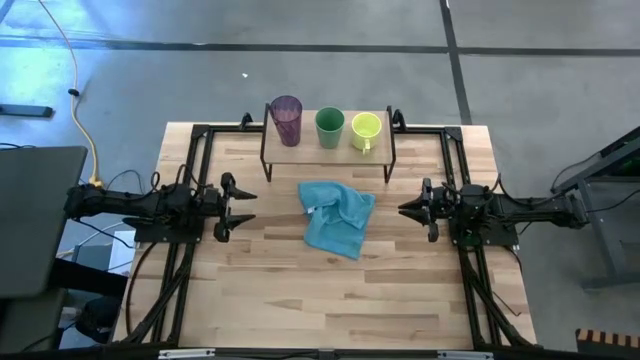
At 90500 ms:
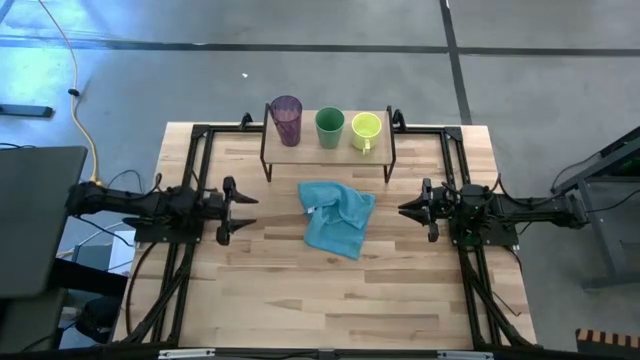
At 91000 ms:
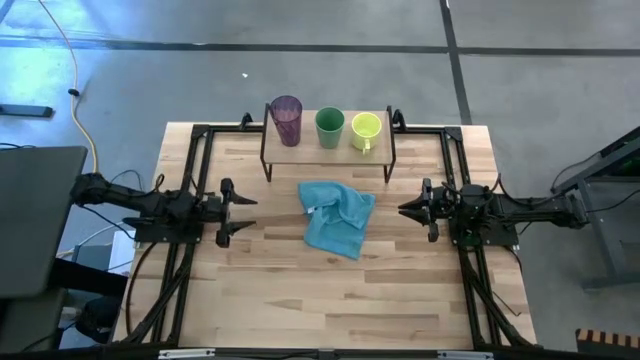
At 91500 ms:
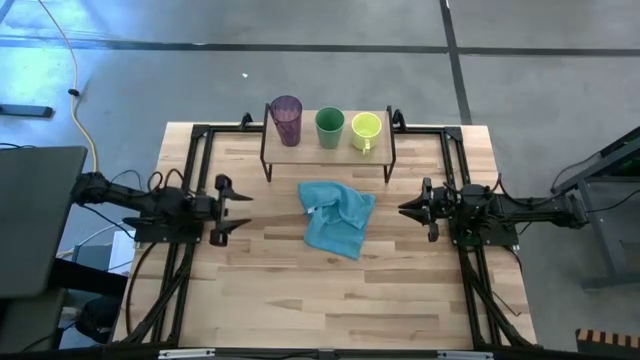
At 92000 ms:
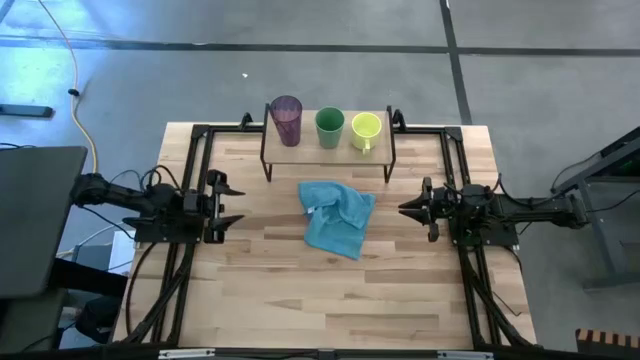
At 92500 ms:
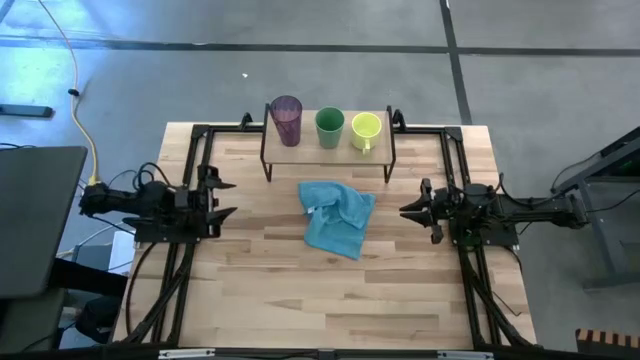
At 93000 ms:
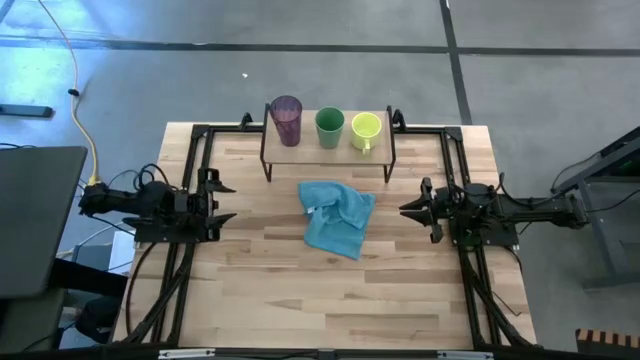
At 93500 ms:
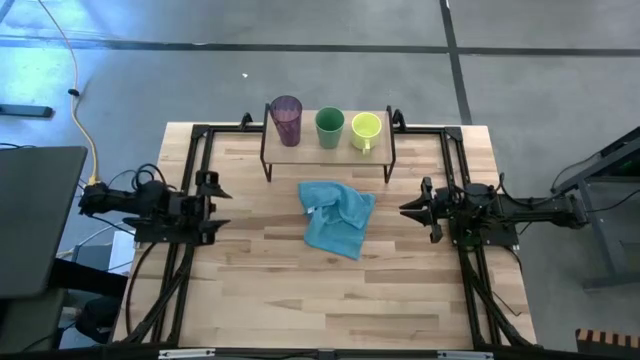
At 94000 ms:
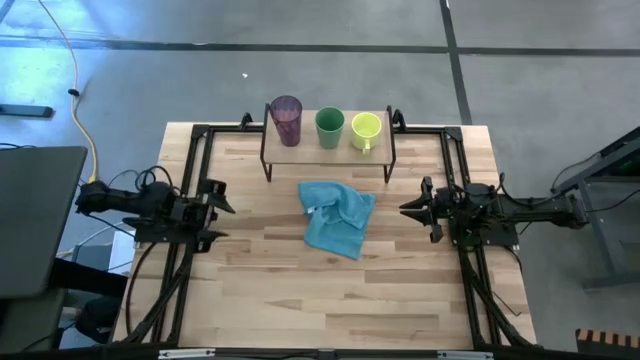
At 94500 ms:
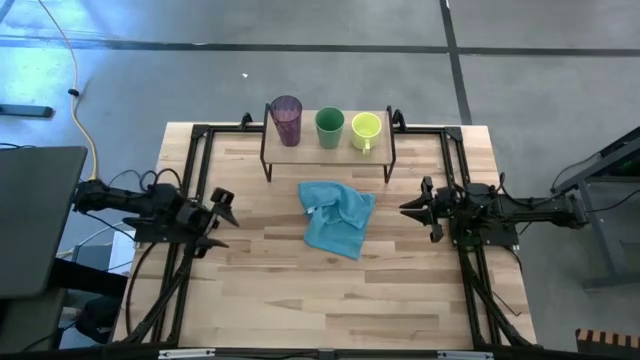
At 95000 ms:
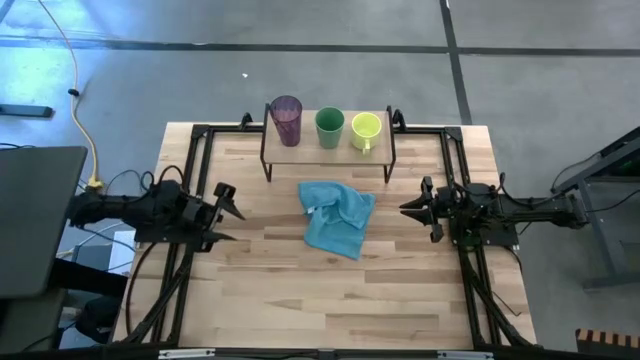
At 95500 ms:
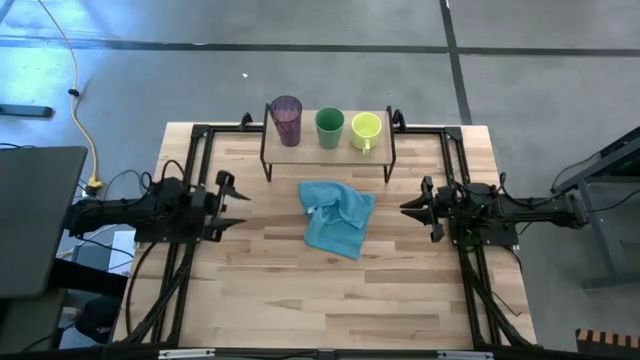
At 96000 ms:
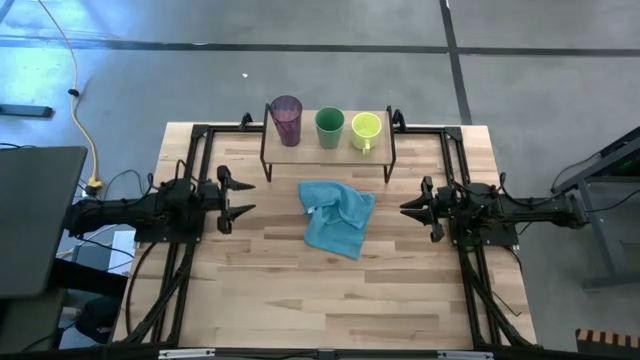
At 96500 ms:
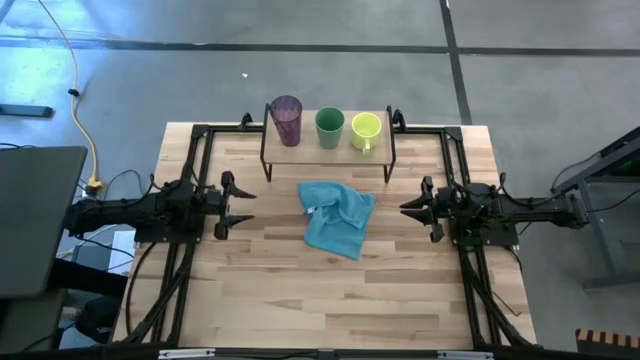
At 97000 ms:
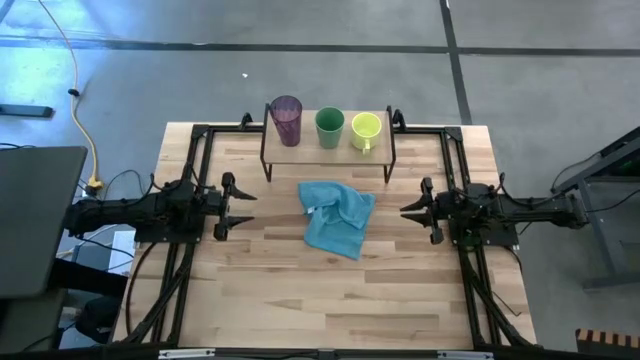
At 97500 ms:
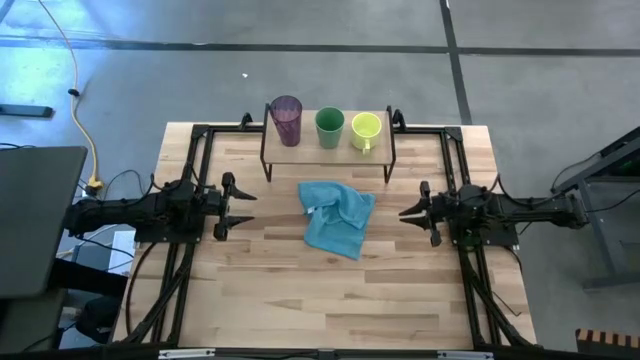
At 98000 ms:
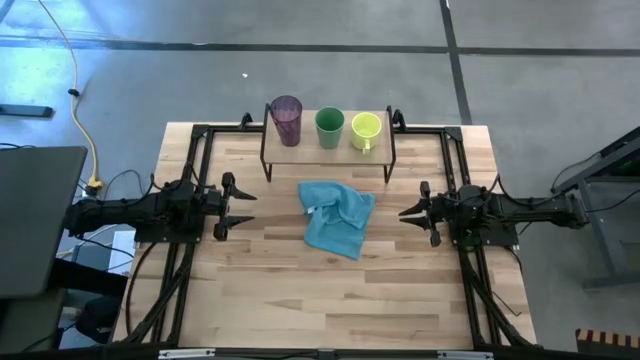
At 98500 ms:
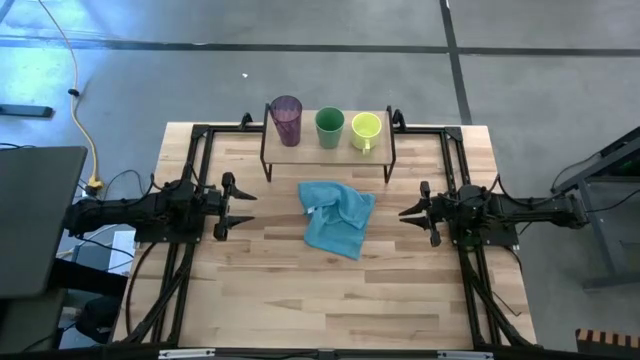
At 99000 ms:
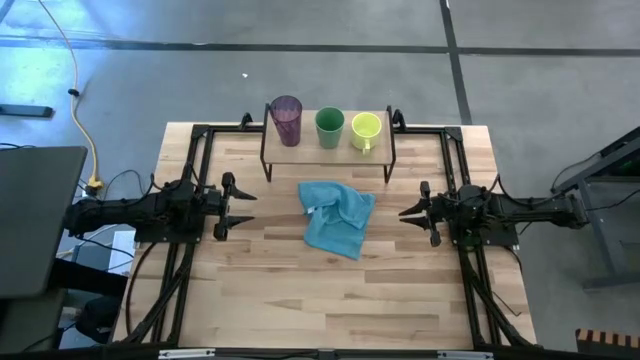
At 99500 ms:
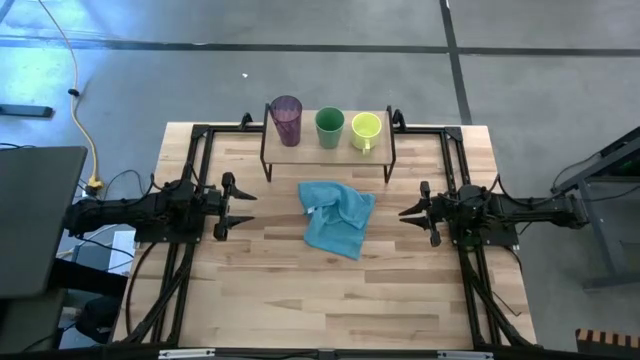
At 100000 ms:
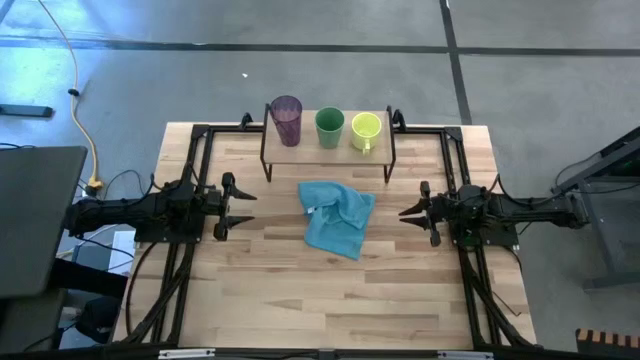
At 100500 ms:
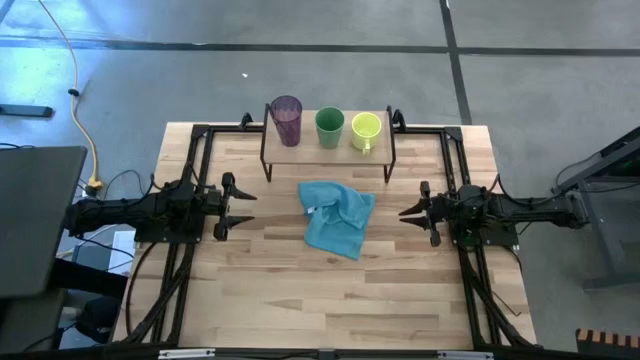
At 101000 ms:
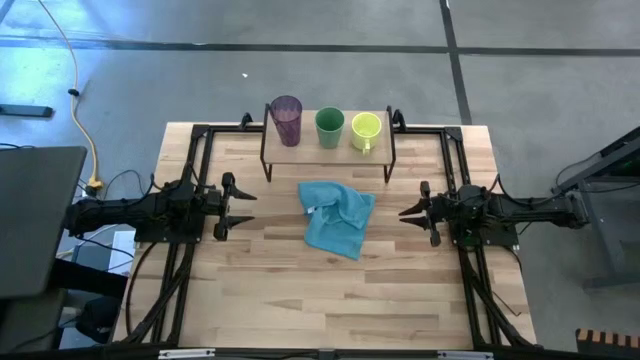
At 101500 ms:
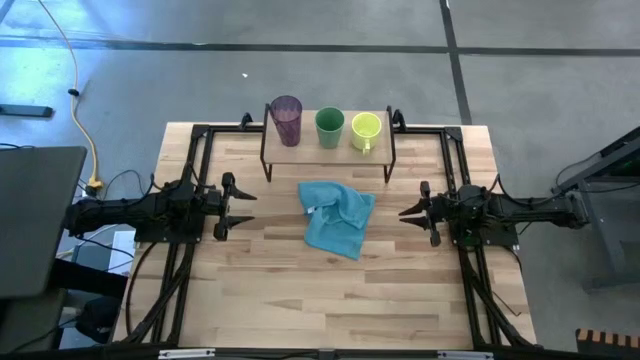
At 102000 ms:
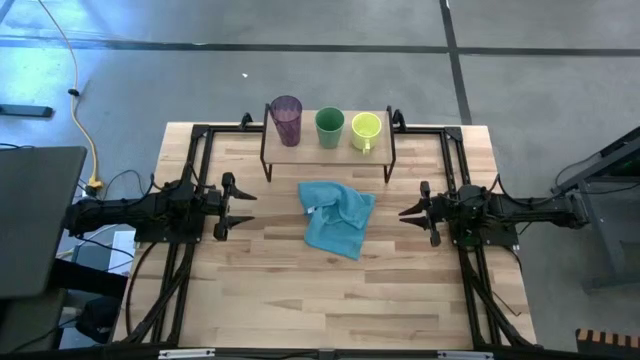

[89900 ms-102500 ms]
Task: Stack small to large cups/mugs on shelf
Return to Home Position

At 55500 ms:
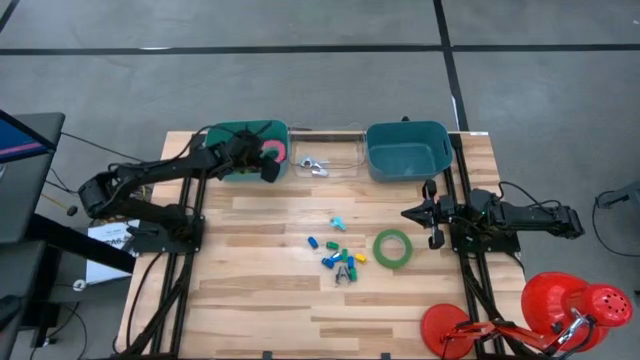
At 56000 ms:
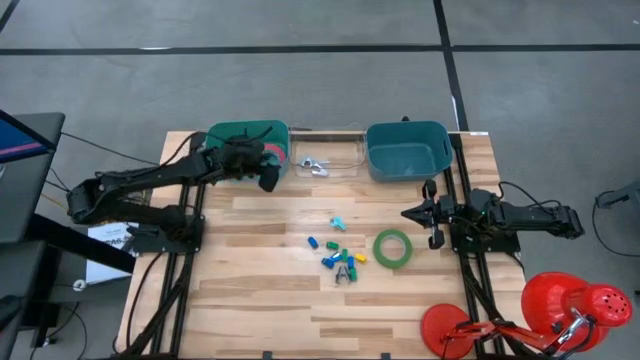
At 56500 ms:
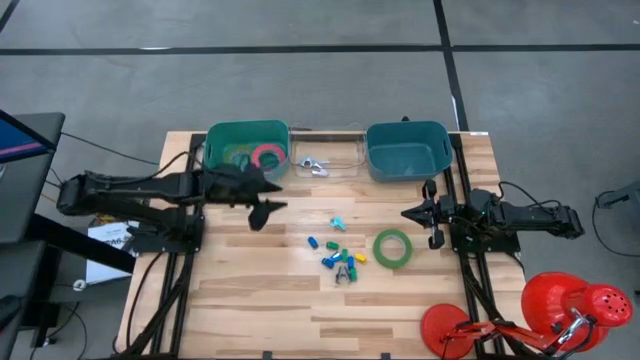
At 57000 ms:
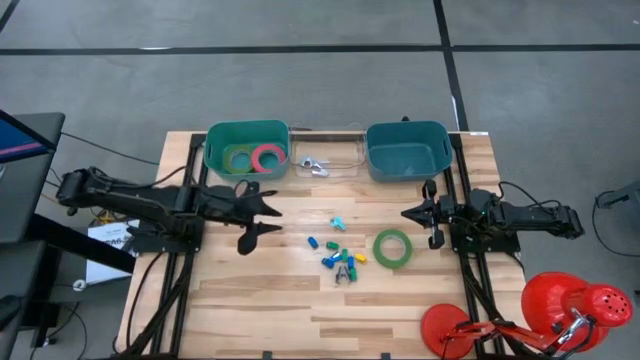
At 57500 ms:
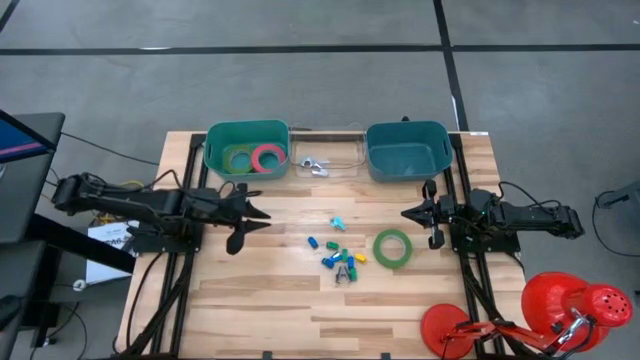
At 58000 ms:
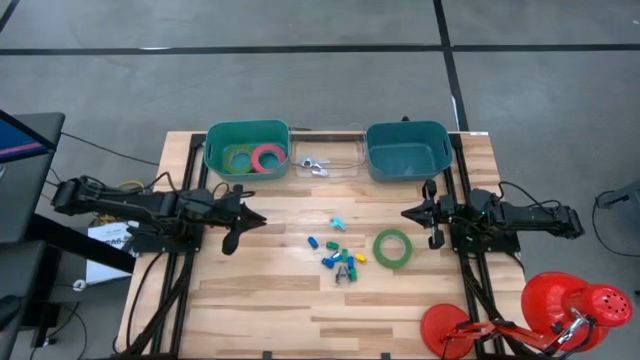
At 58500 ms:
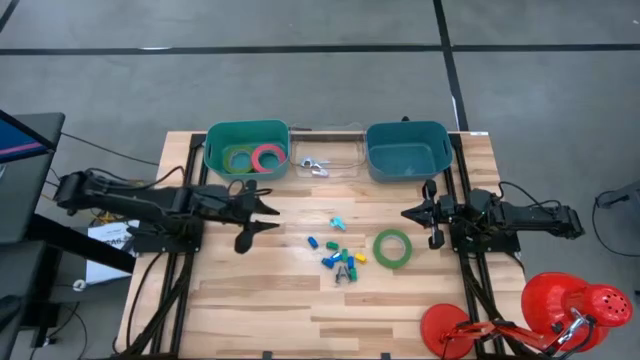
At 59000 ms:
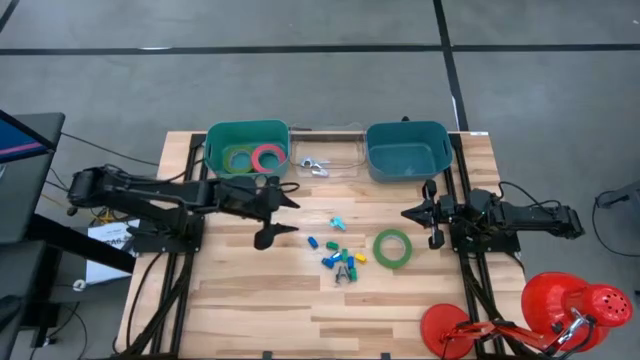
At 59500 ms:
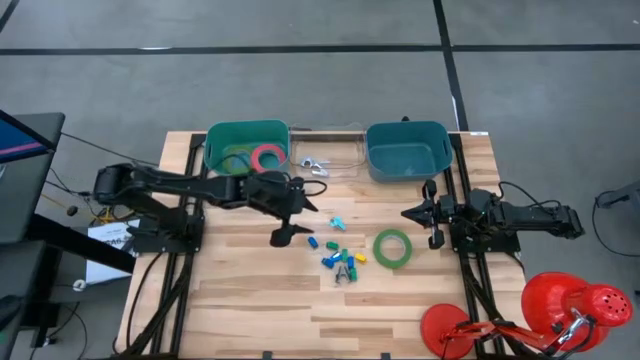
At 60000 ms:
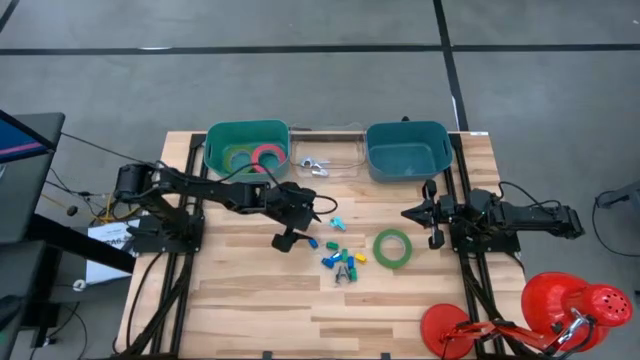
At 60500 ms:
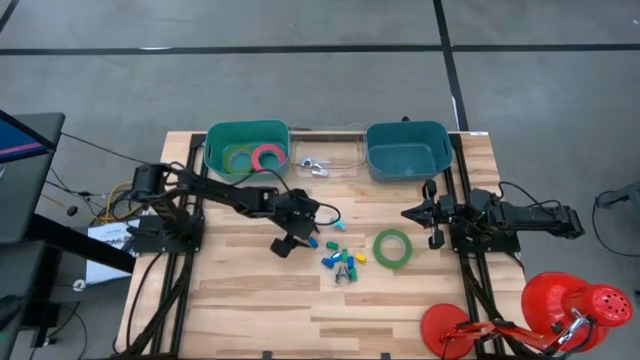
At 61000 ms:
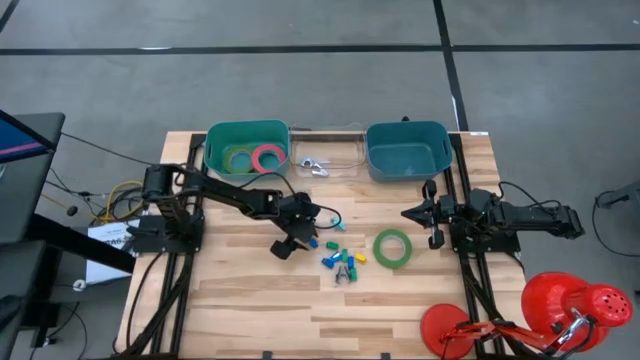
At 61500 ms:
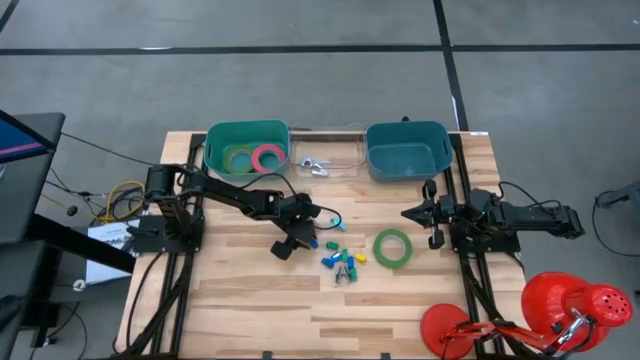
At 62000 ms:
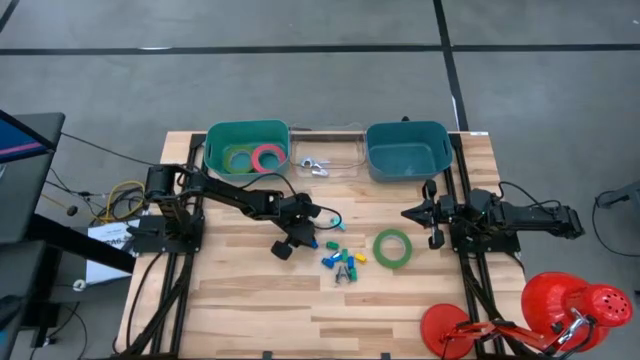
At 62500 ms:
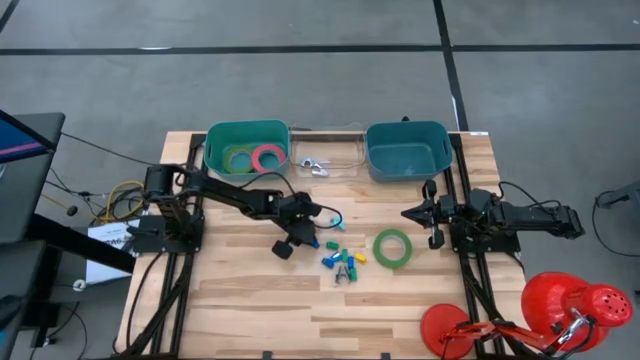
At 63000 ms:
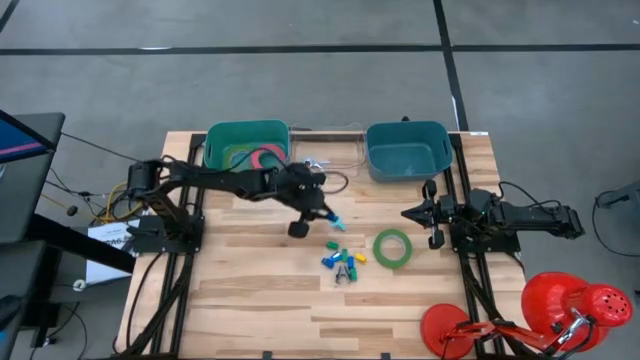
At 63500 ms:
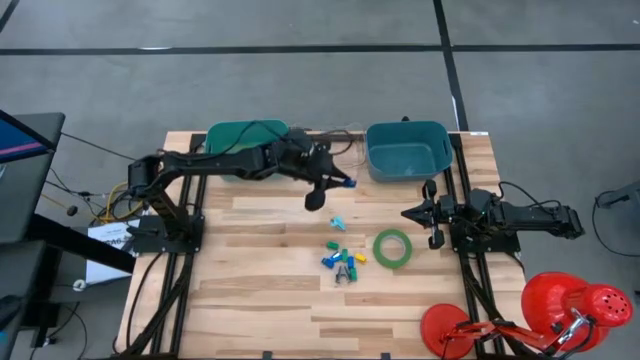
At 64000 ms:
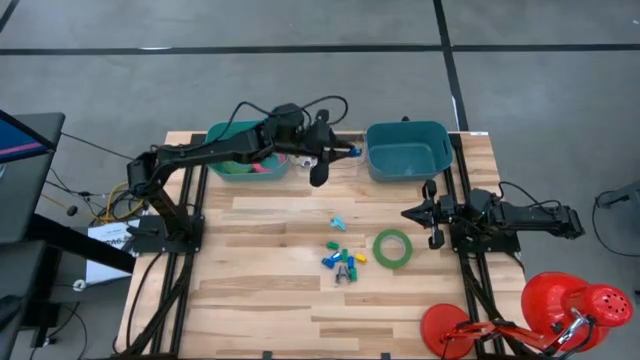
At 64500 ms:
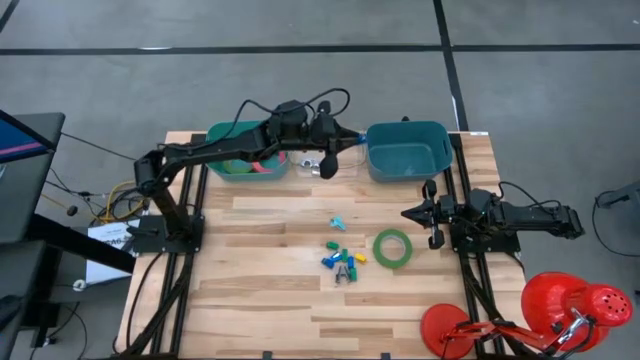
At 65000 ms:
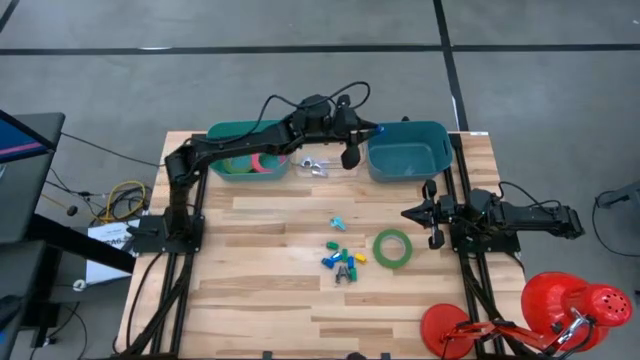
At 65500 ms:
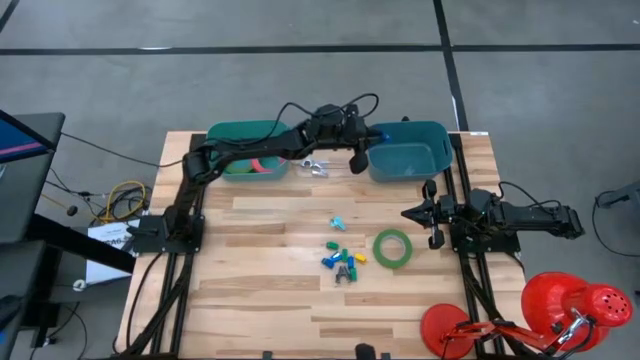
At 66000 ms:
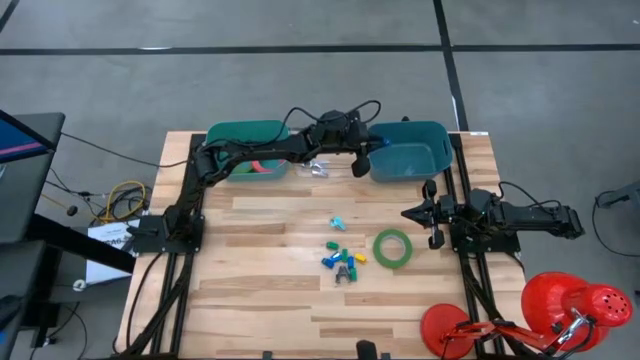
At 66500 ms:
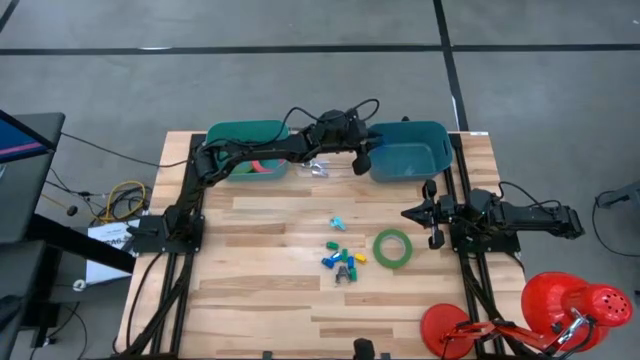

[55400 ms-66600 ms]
Task: Pick and place Stapler, Stapler remover, tape
Put the blue staple remover into the dark blue bin
